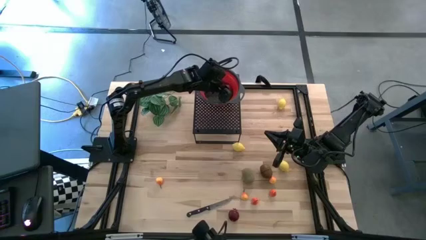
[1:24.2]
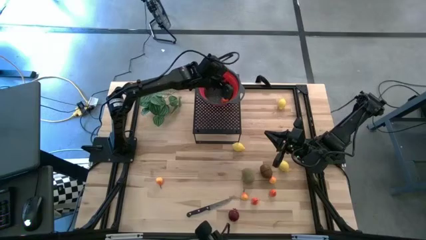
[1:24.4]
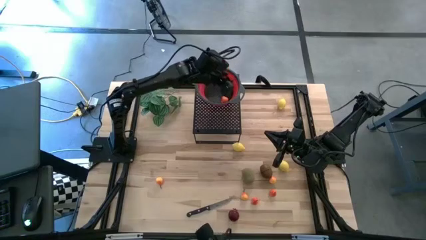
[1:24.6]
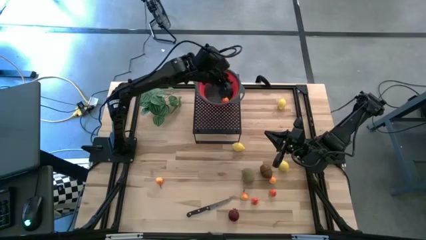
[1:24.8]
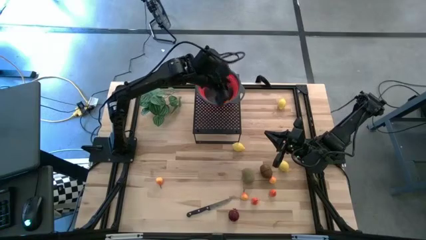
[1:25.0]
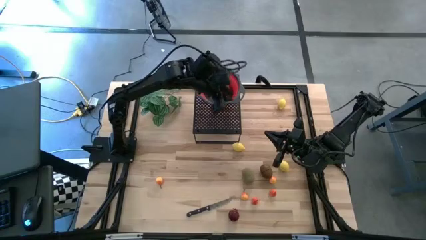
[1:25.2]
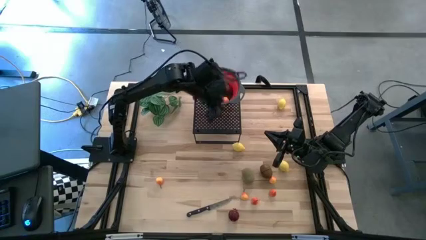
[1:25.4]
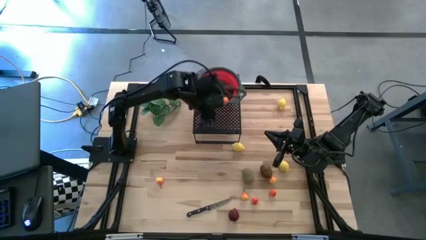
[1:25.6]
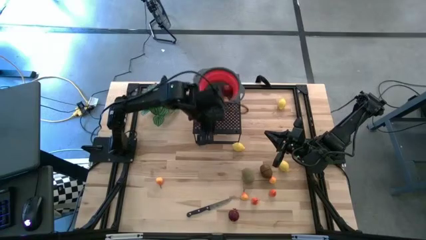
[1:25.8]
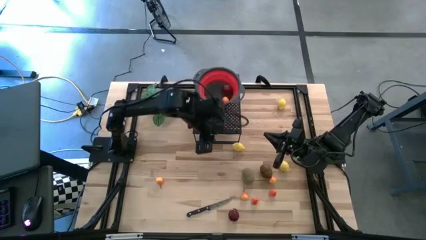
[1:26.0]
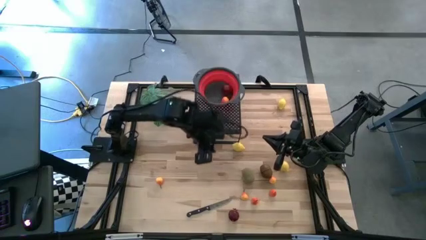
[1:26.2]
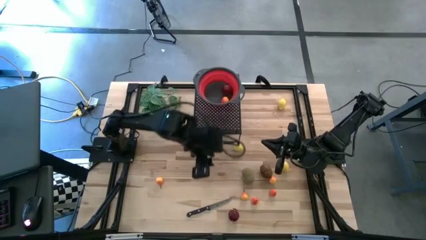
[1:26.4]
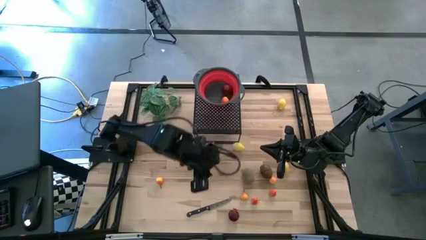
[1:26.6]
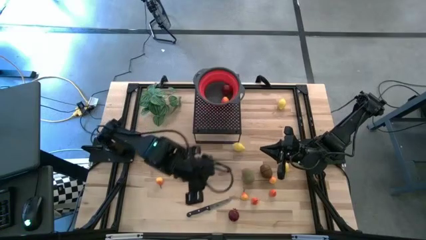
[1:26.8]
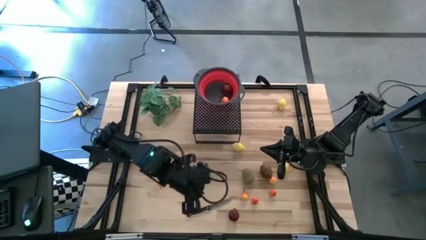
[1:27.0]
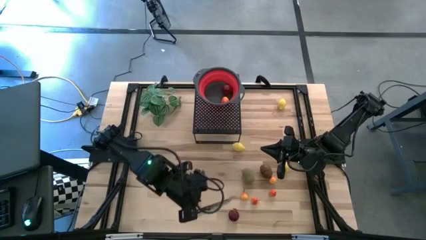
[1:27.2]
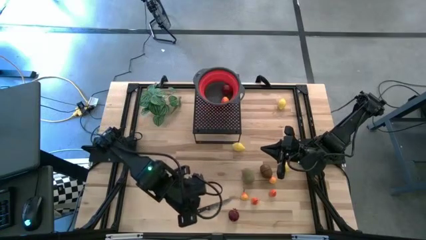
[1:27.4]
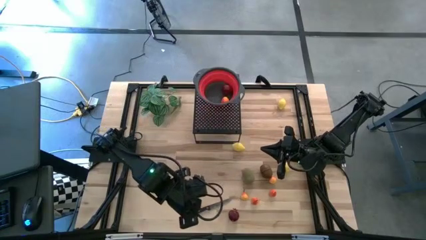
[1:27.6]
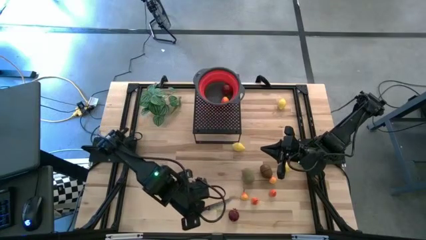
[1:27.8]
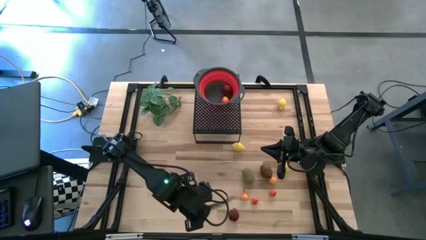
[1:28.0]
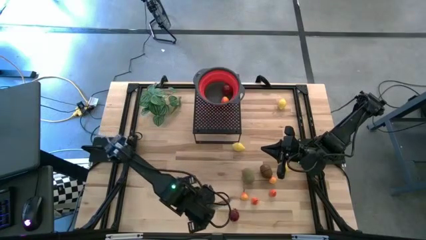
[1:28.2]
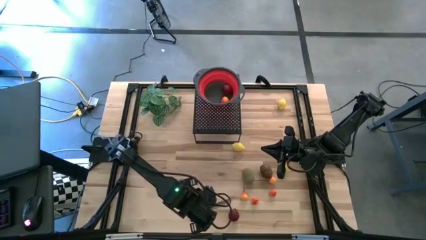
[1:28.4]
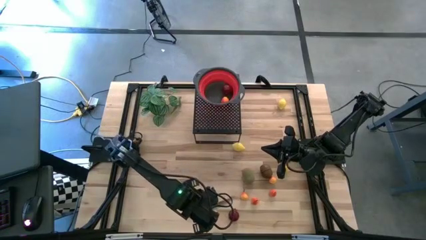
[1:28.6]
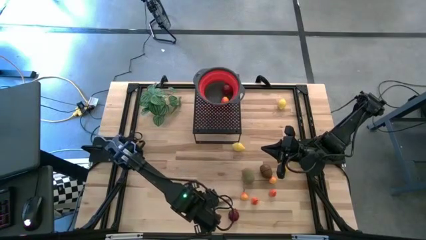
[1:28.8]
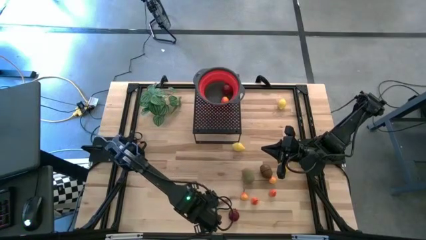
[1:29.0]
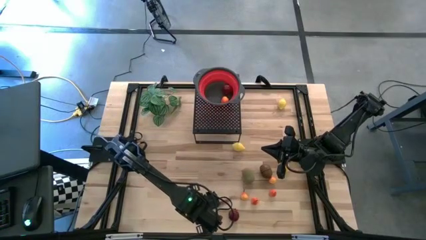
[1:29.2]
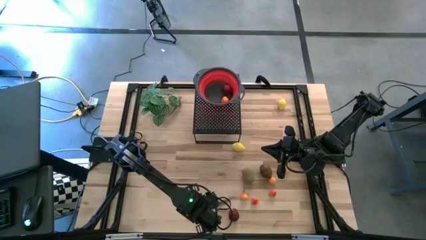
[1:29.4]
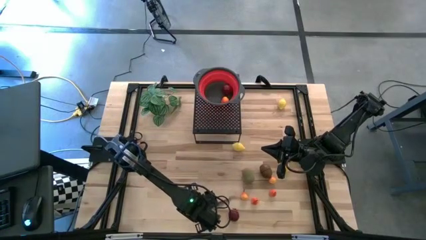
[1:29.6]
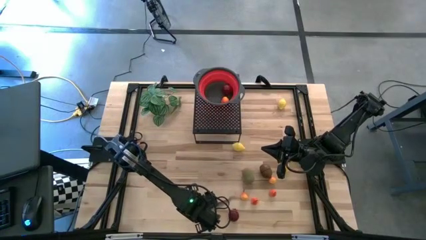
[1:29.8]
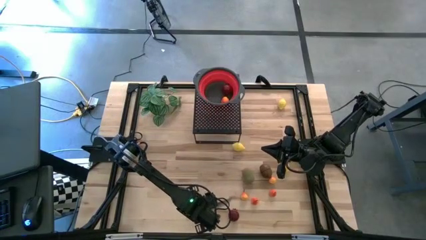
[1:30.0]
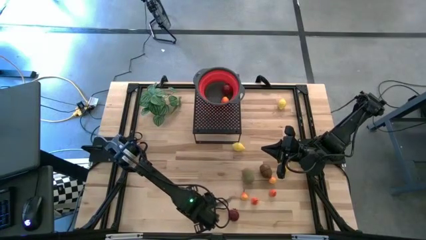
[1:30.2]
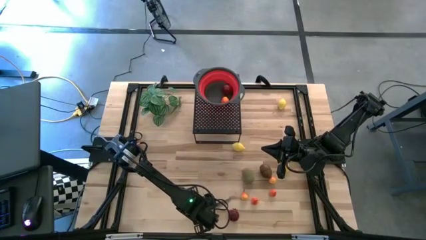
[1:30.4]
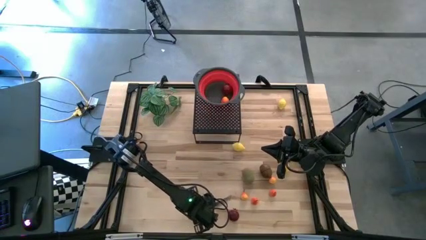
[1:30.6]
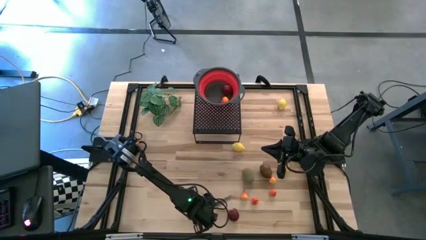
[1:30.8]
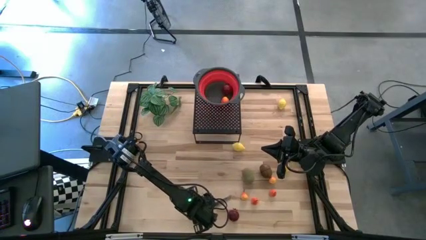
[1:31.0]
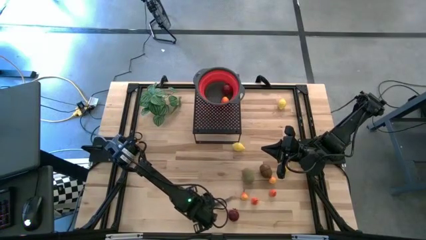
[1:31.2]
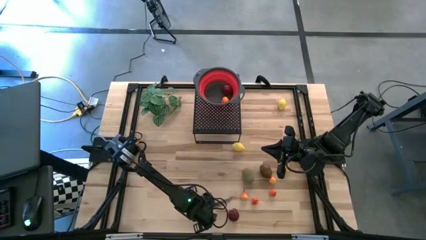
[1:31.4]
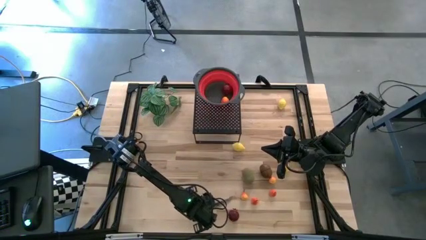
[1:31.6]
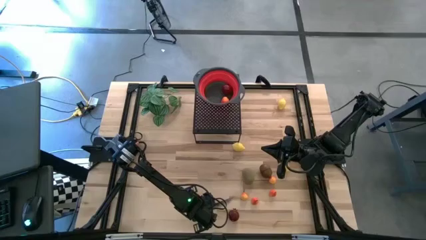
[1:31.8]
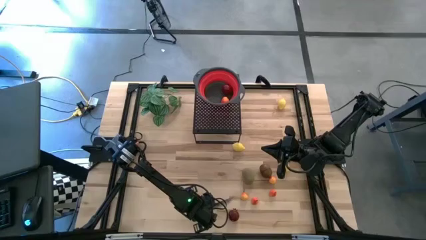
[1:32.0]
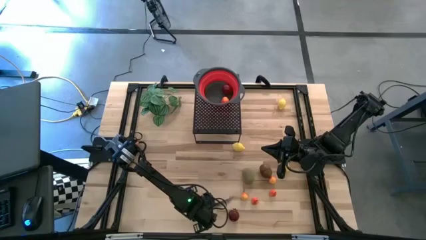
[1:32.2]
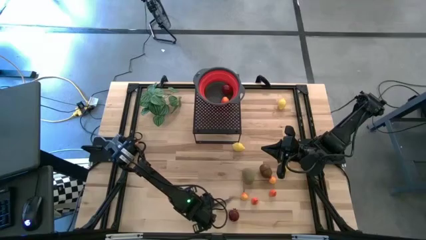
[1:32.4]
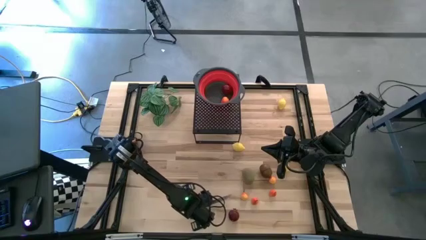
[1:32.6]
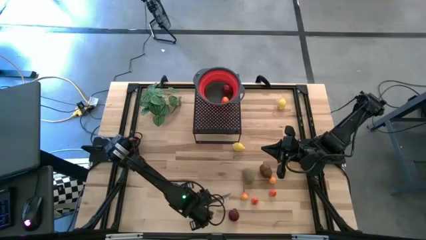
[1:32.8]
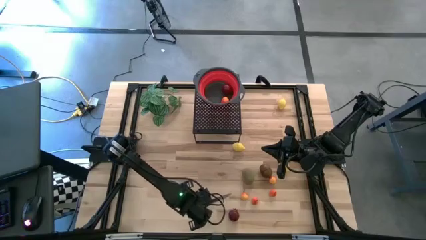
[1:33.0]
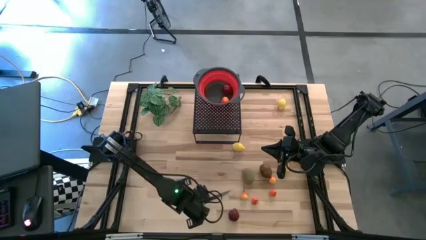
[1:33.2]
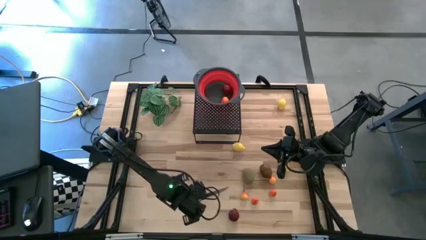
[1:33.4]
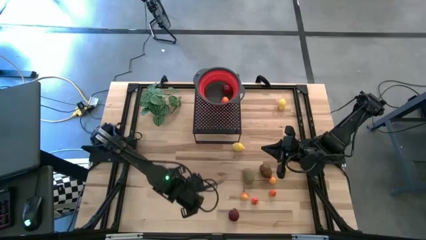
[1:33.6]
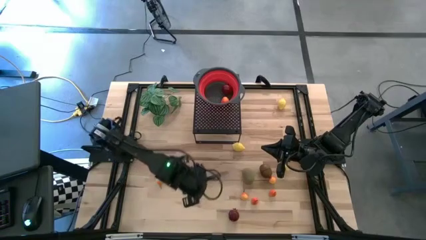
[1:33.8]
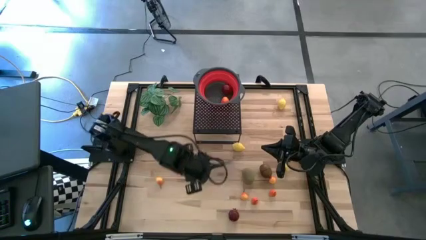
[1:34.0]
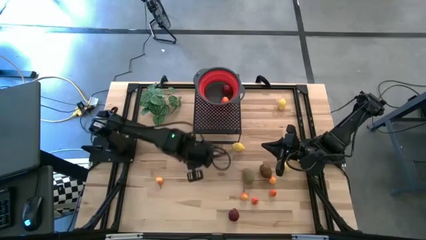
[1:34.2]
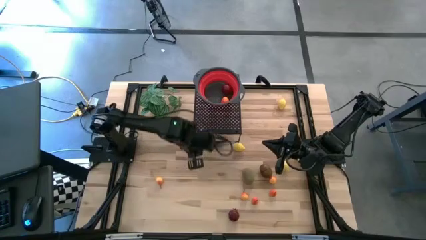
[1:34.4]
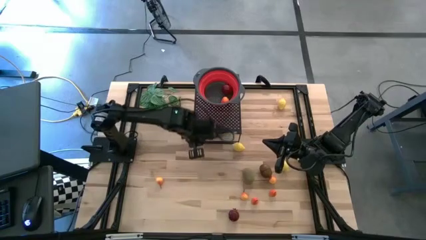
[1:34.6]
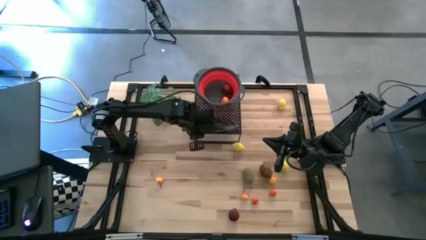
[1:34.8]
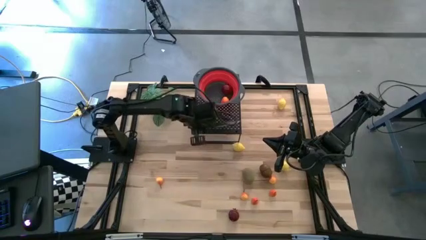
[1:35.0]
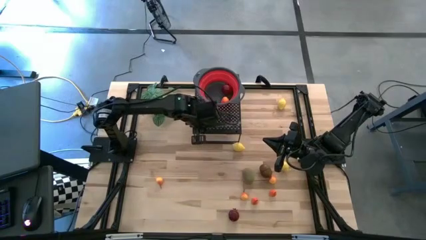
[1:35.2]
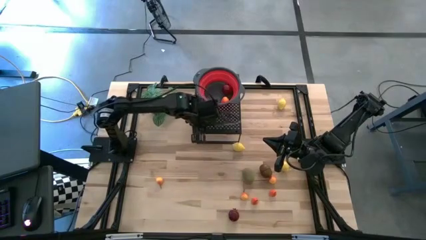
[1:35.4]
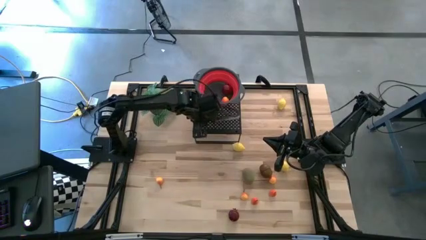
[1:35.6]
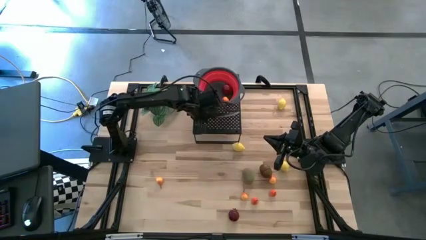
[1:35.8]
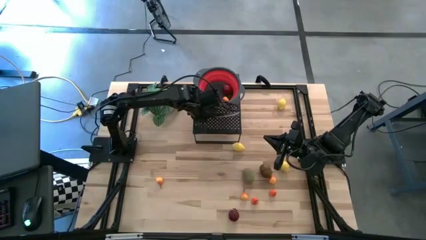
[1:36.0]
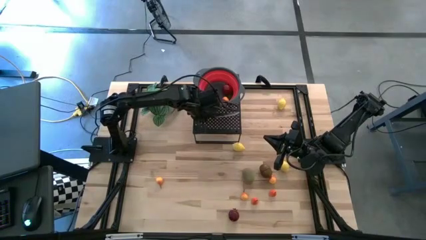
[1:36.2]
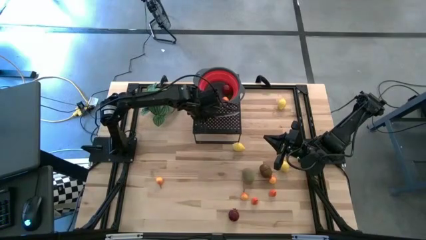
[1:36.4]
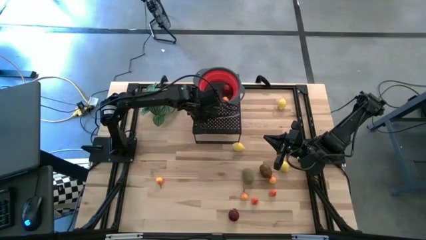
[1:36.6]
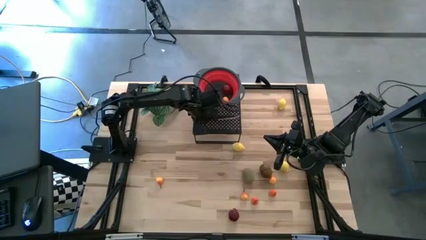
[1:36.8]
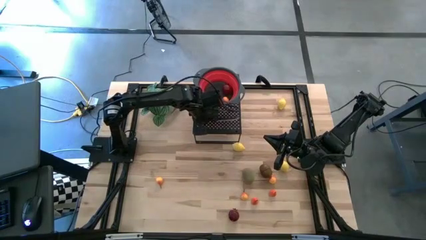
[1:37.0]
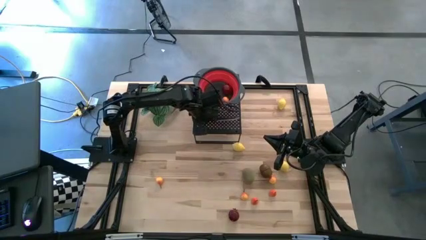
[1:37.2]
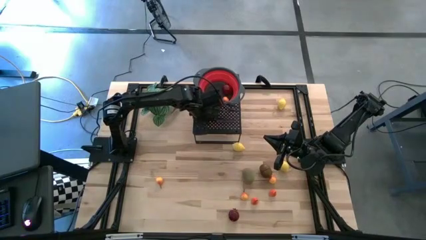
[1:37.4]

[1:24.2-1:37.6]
Task: Pick & Place Fruit
Put the black knife on the shelf
